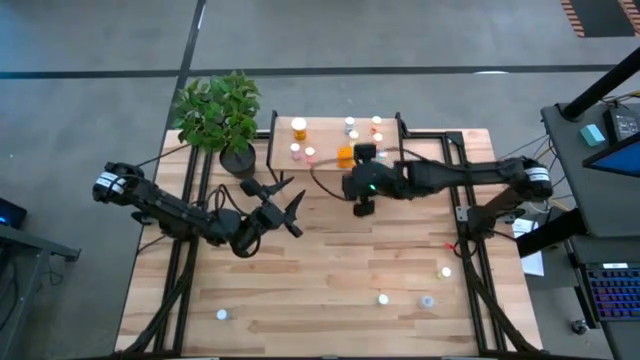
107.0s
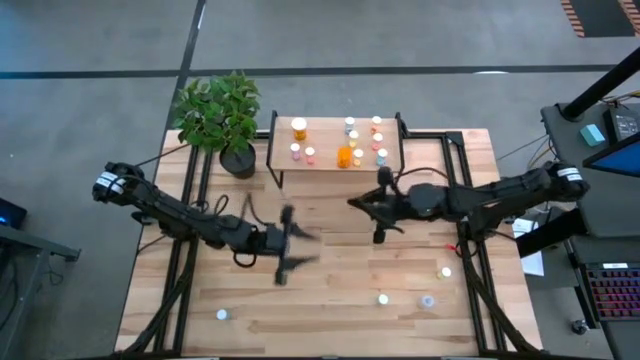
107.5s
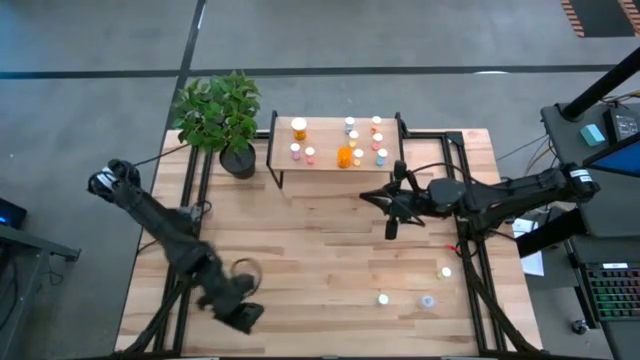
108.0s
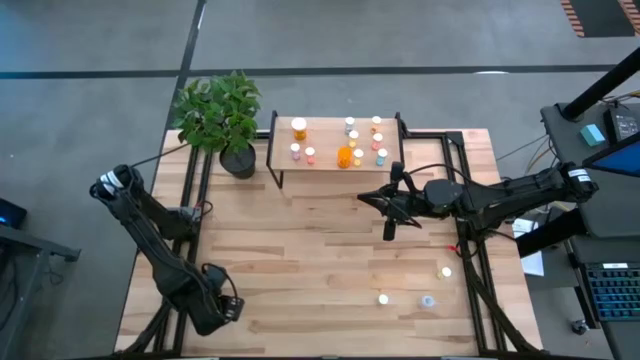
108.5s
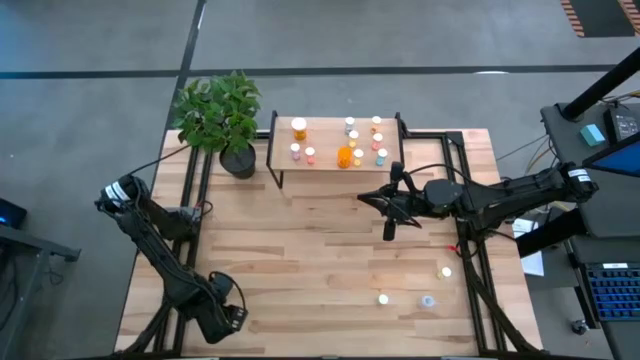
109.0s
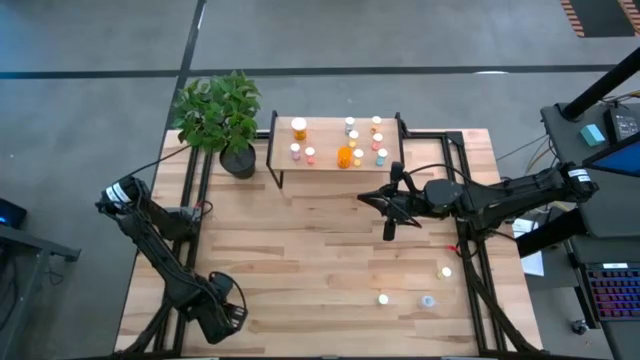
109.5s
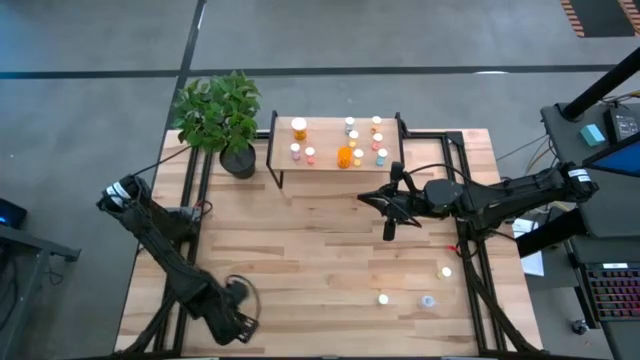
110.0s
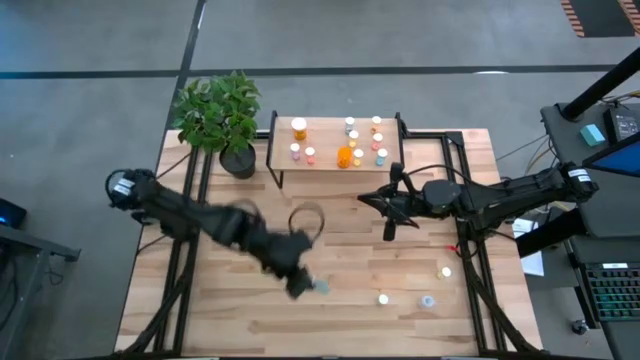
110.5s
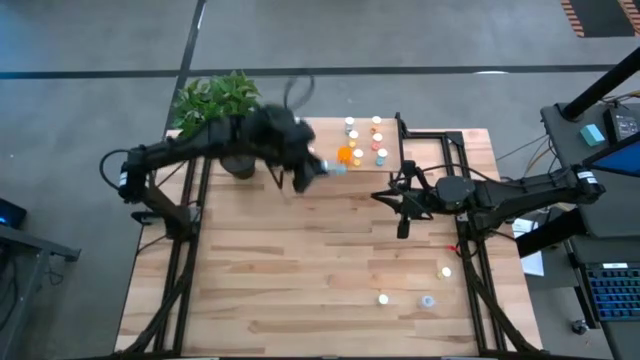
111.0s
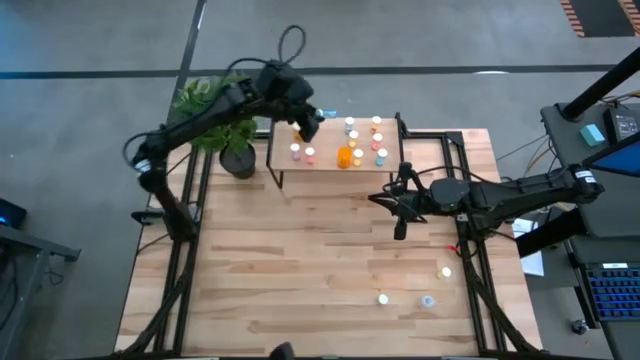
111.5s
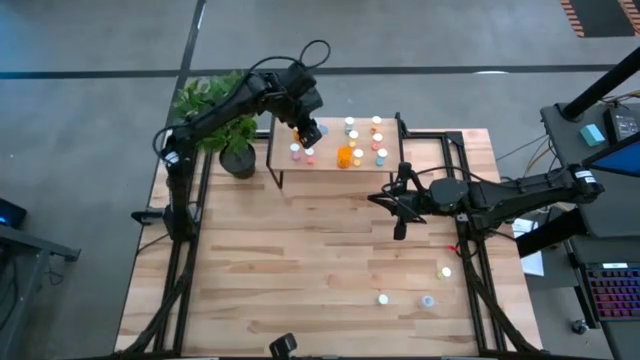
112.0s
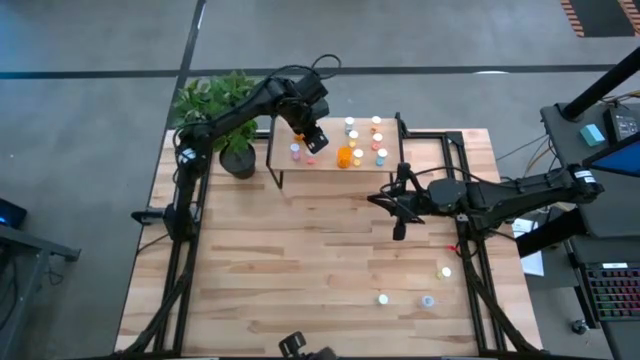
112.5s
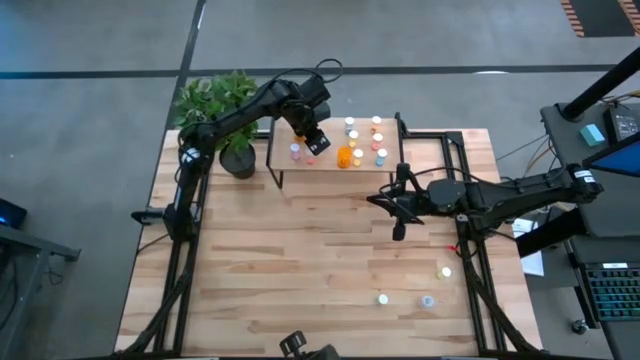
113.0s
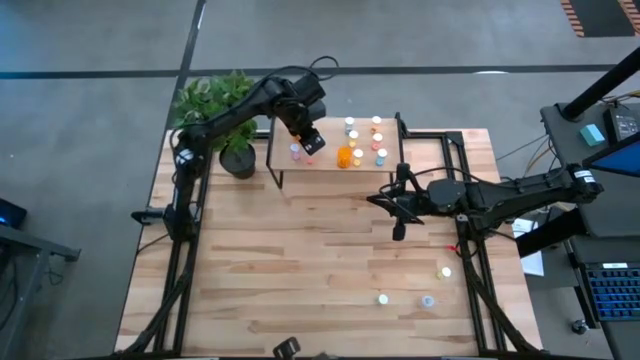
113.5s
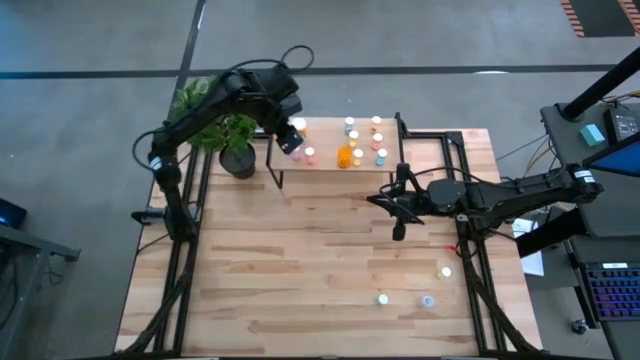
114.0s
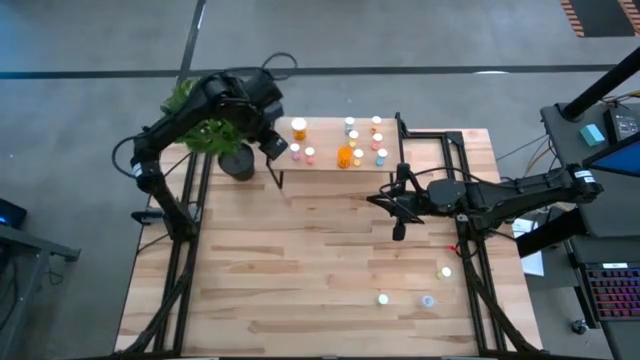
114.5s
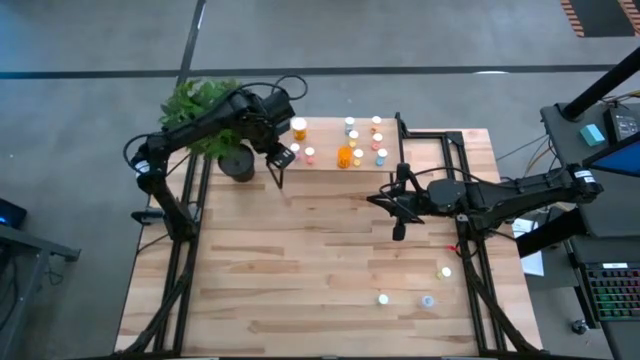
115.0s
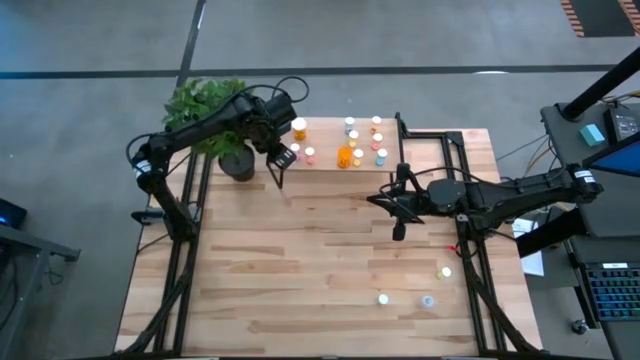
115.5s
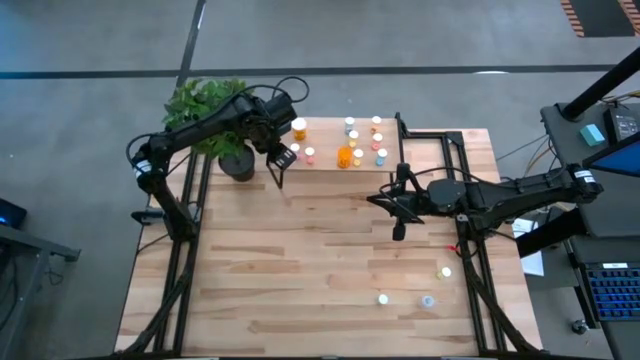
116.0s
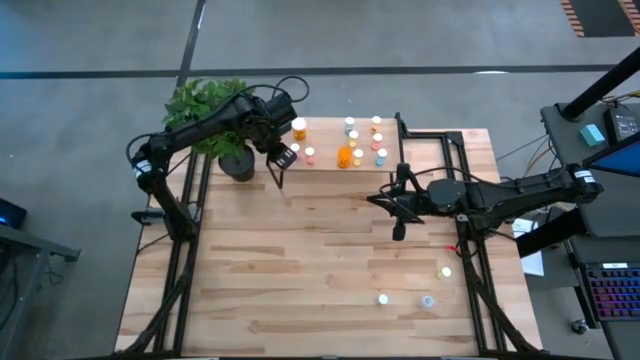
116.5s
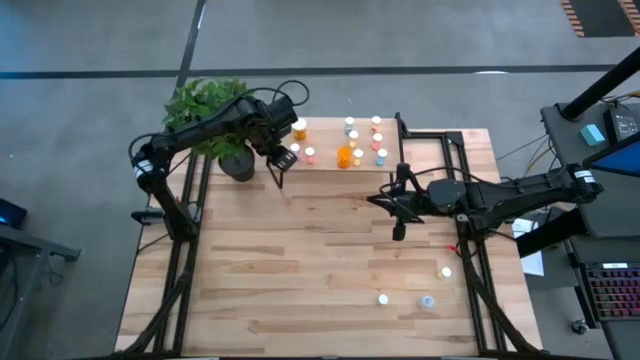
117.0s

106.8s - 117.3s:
Task: Pick and place medicine bottles onto shelf by color
Put the blue pill bottle on the shelf

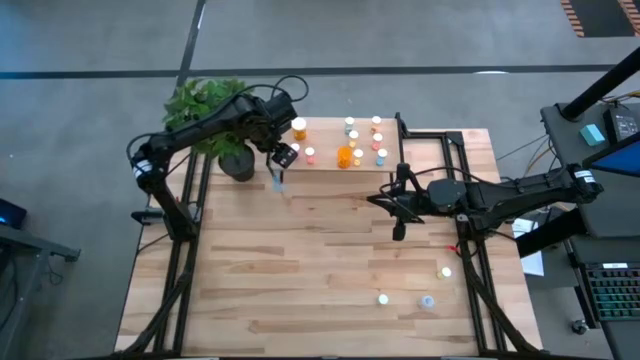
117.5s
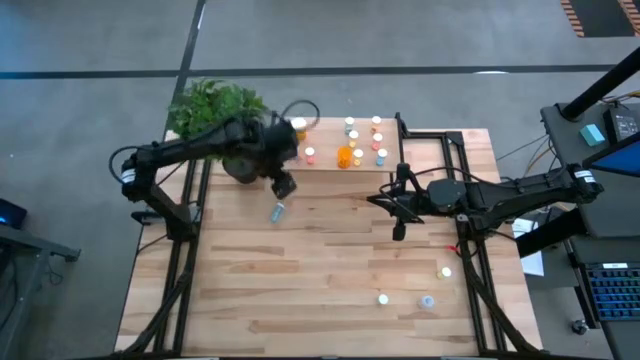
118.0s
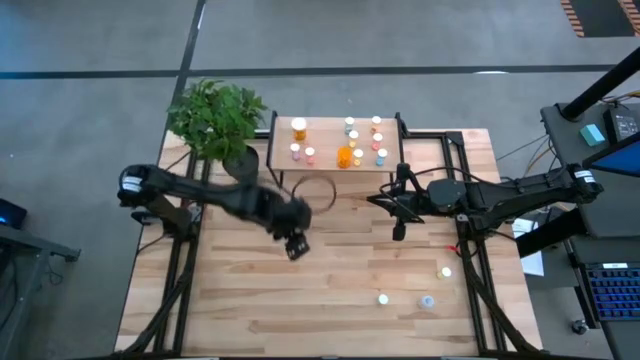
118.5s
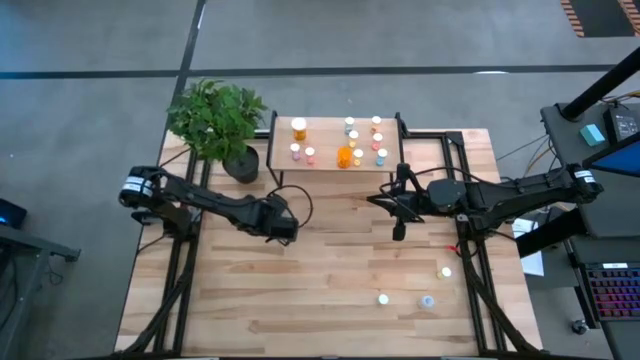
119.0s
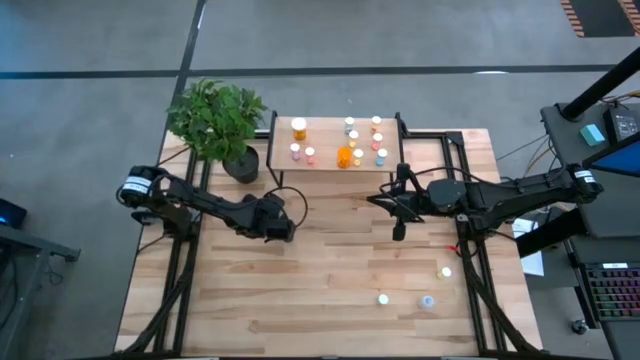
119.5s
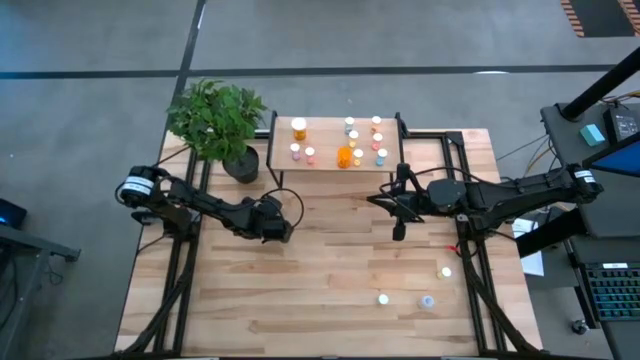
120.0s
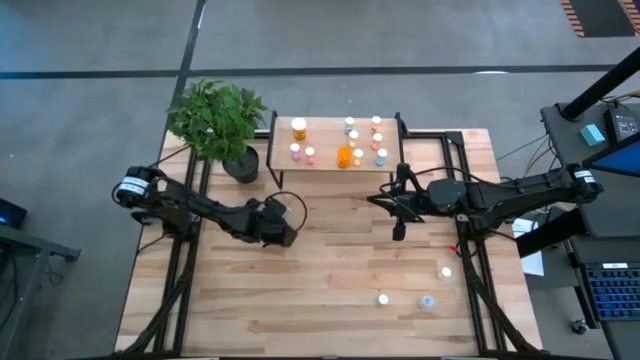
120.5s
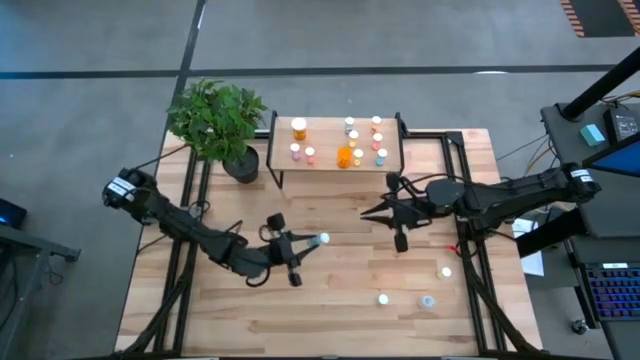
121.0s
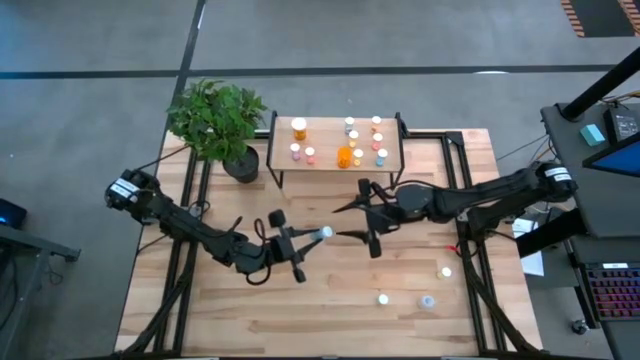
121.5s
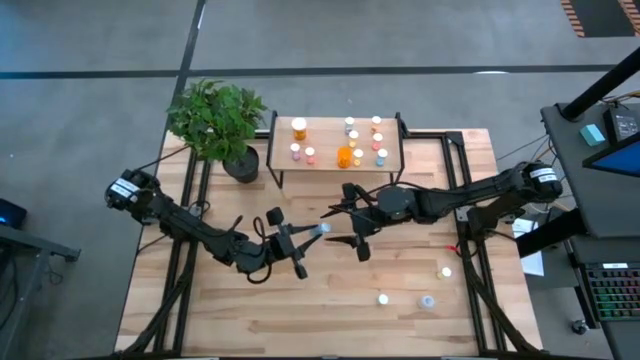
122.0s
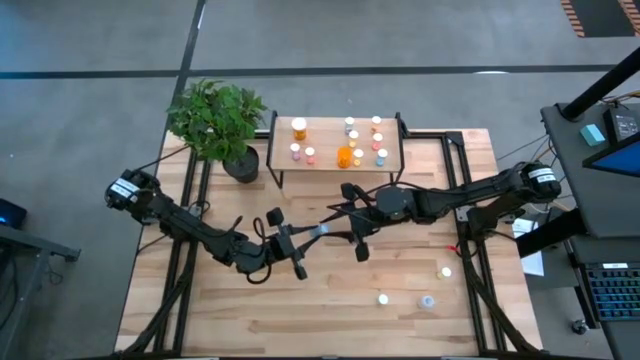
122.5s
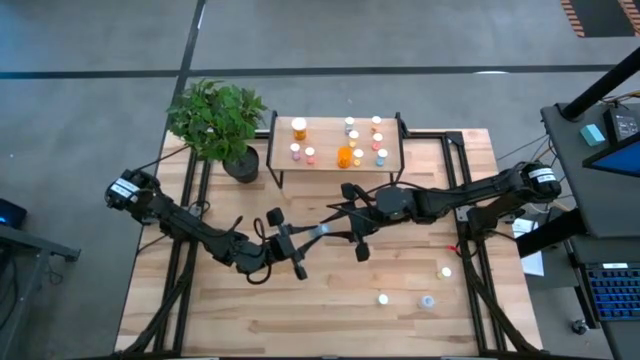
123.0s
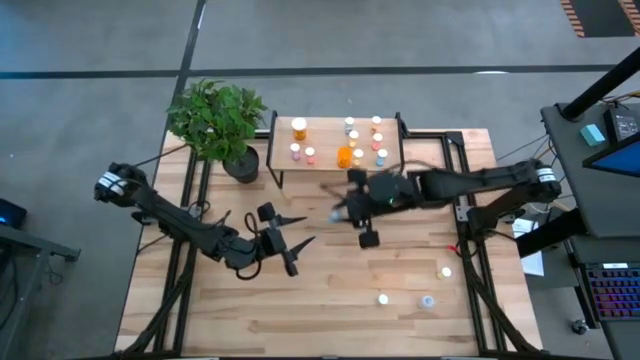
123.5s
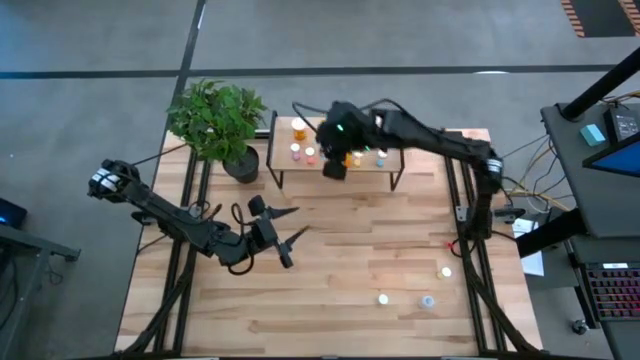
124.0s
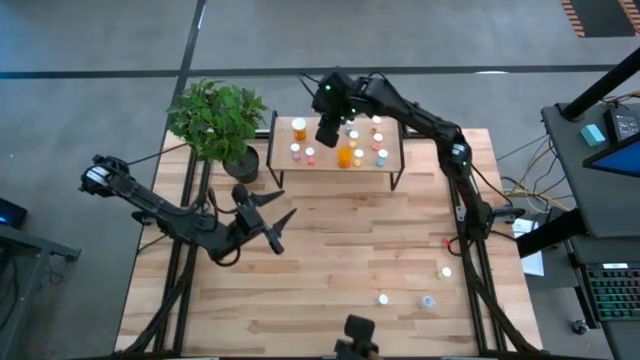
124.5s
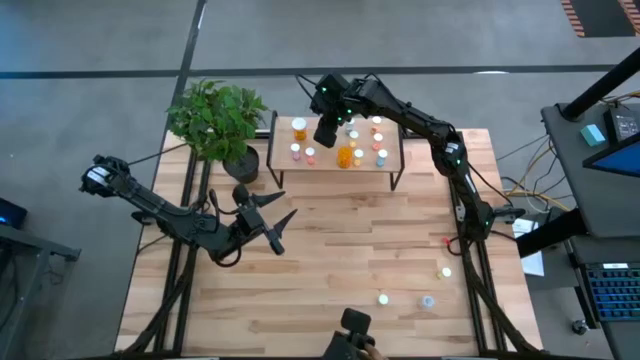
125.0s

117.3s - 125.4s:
Put the blue pill bottle on the shelf

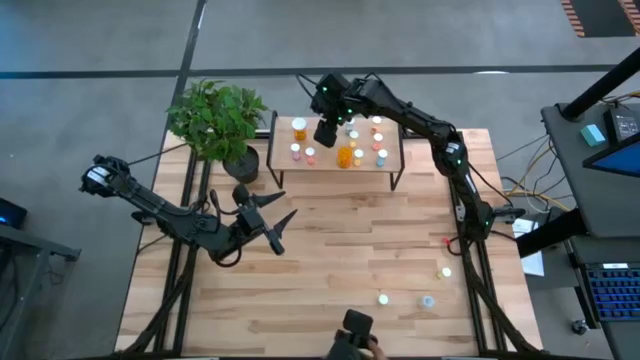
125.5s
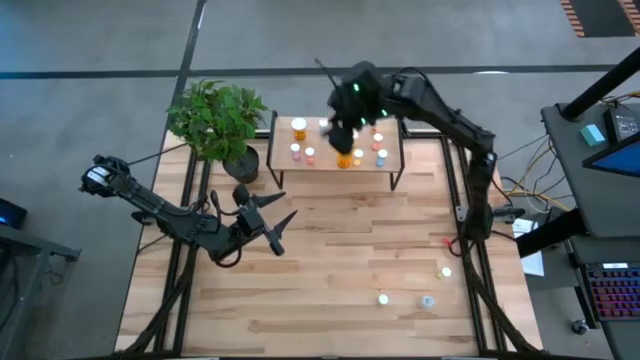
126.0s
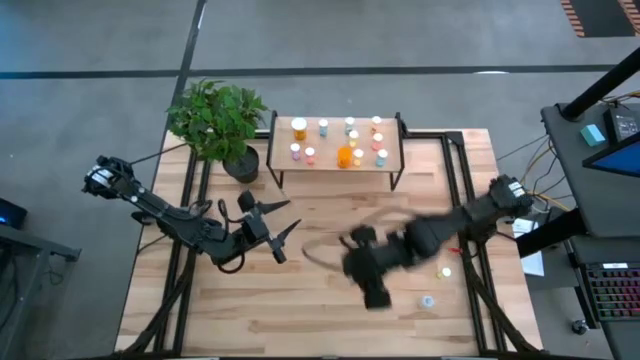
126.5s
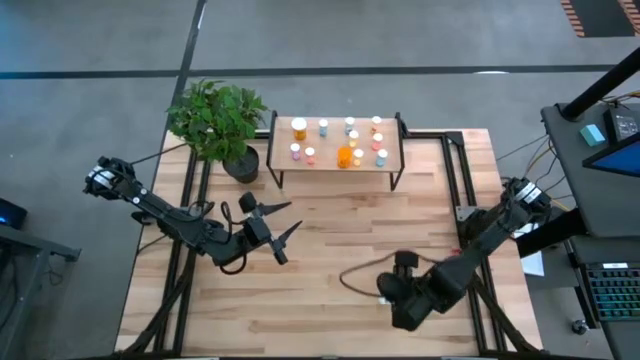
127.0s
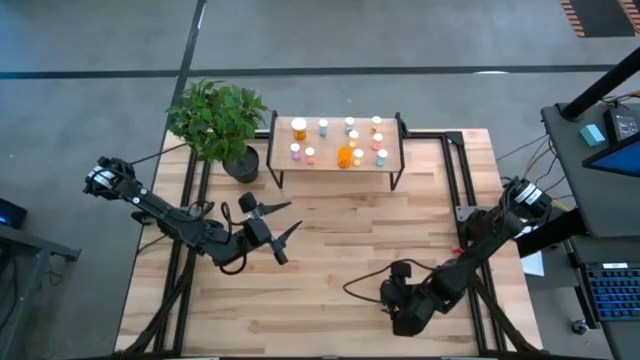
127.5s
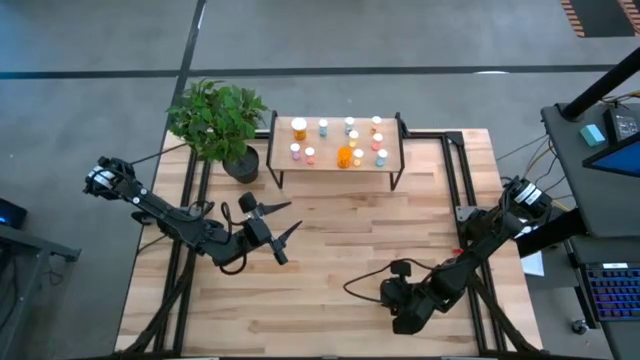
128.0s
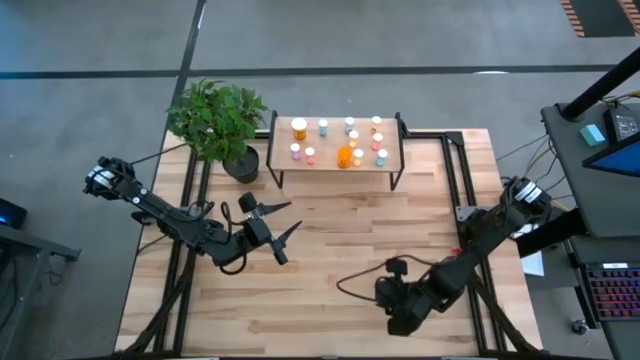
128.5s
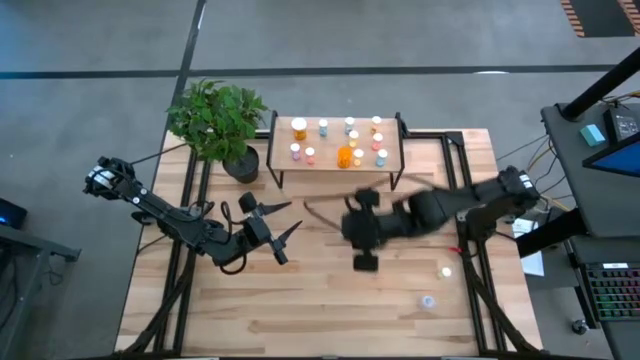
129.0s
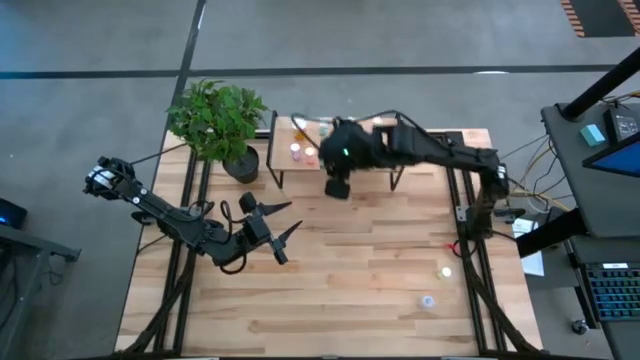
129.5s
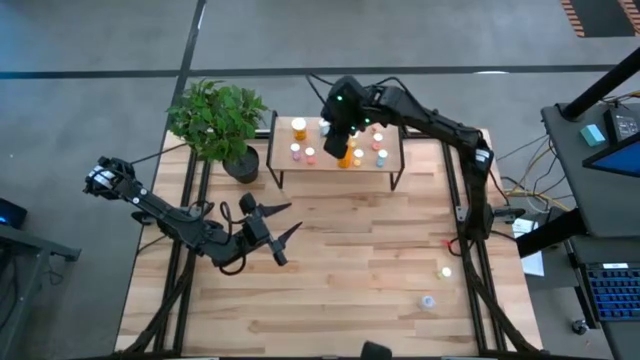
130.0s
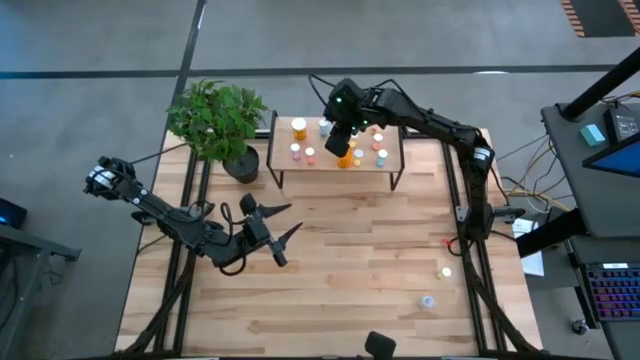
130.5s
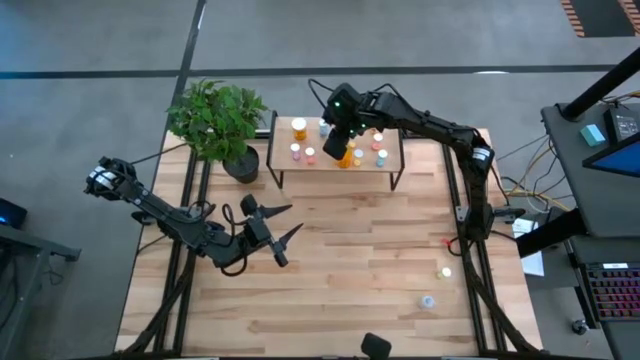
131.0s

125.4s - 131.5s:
Put the yellow pill bottle on the shelf
